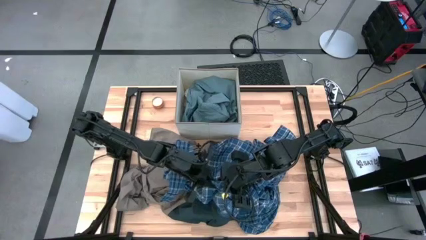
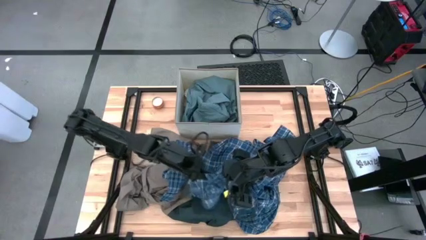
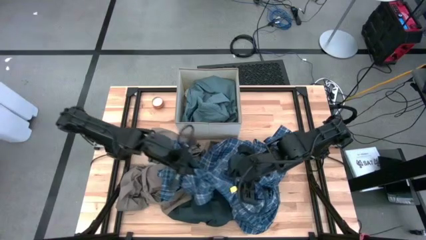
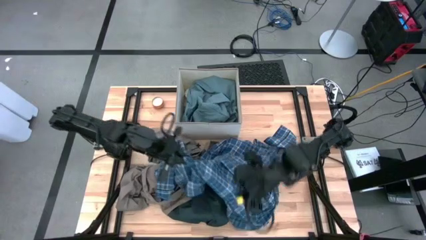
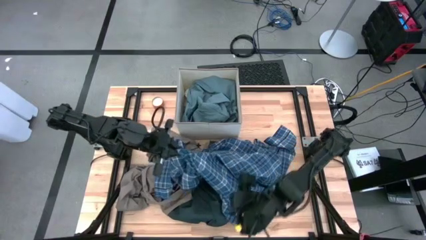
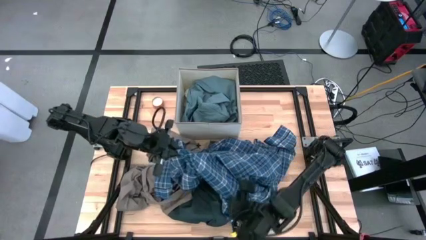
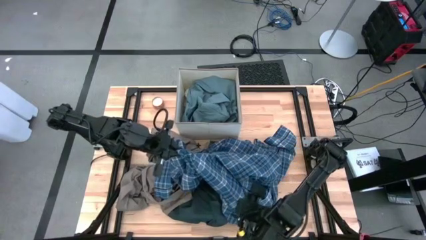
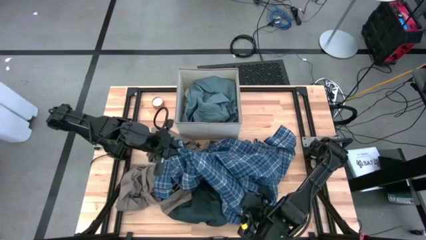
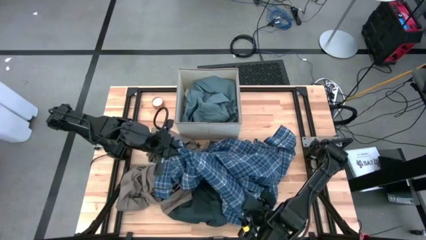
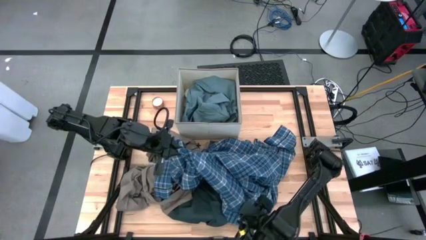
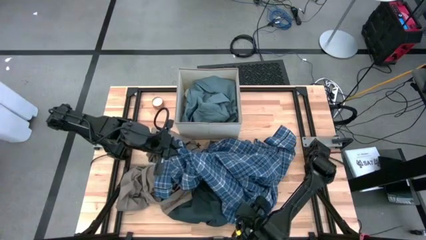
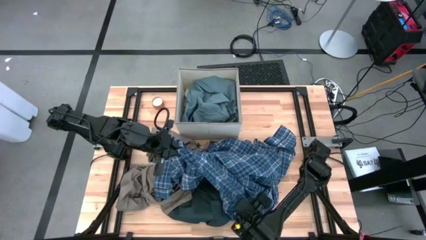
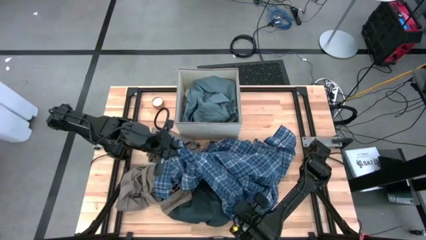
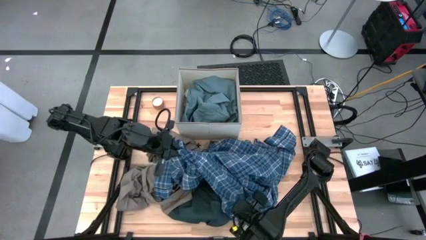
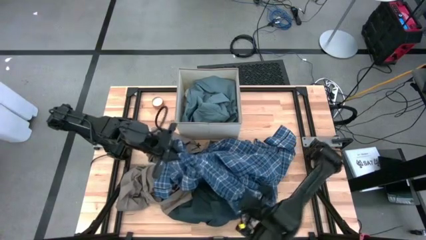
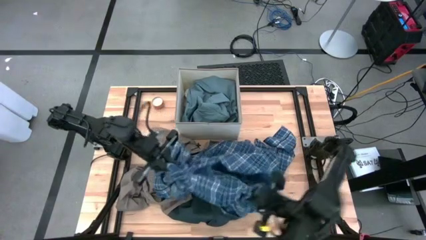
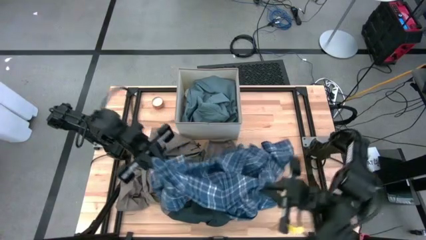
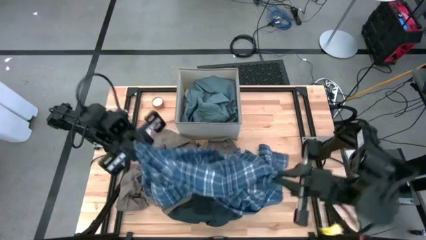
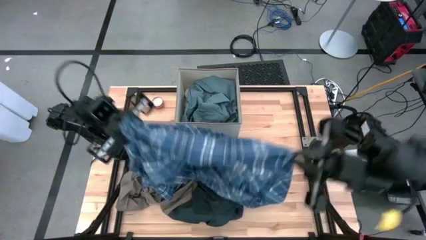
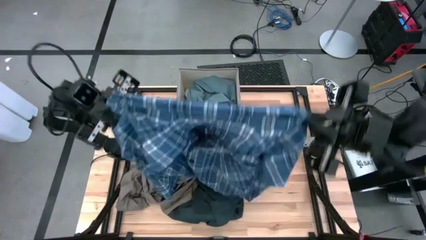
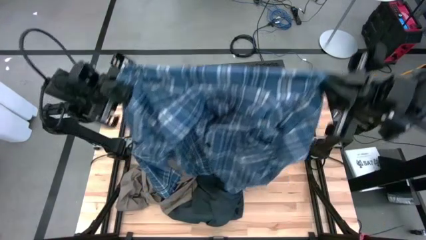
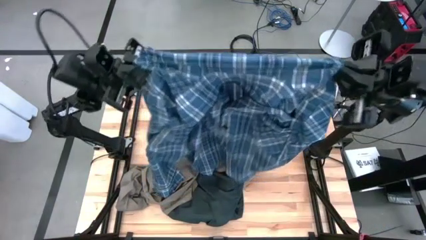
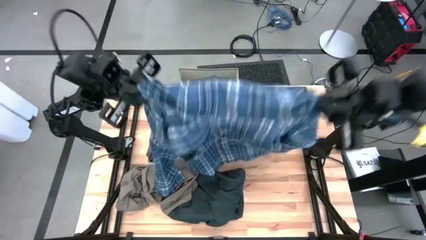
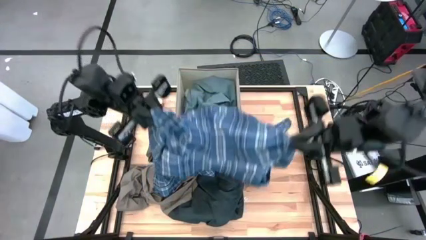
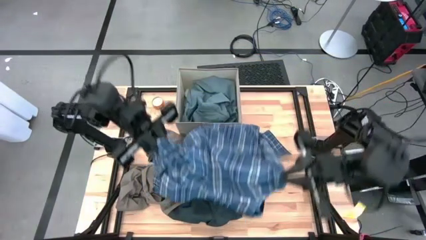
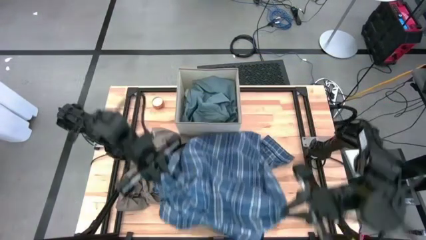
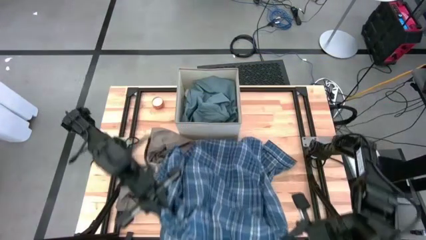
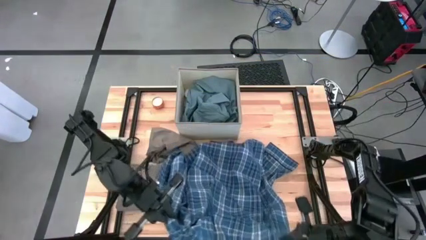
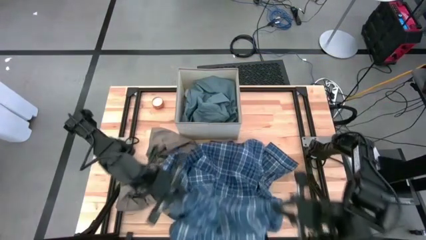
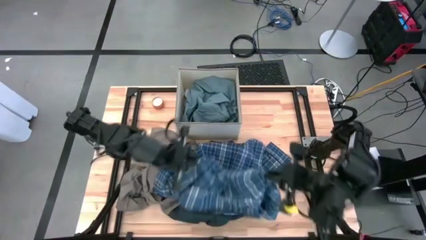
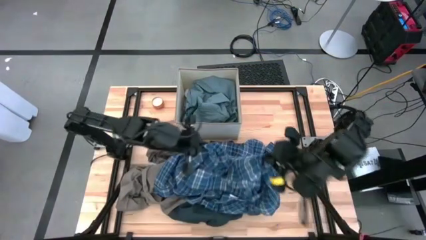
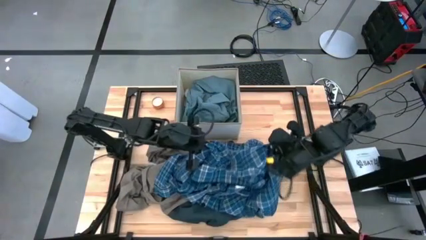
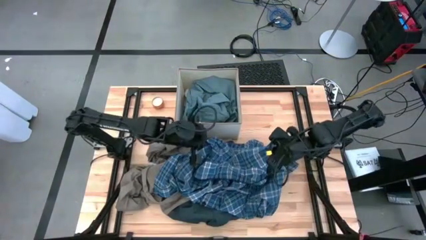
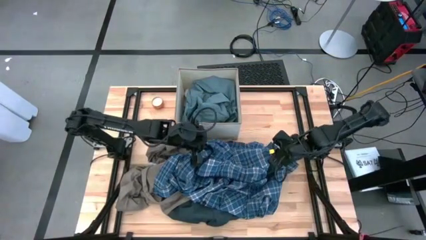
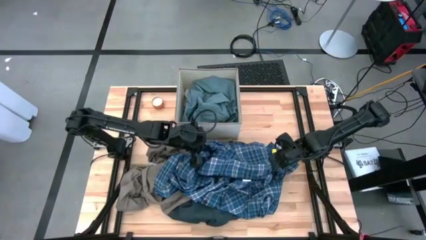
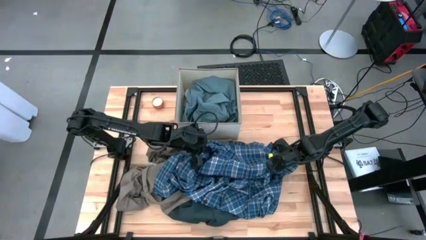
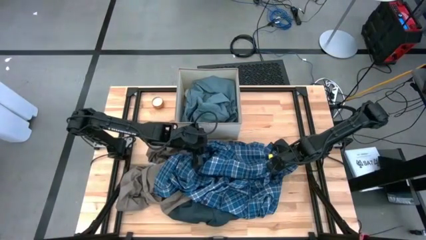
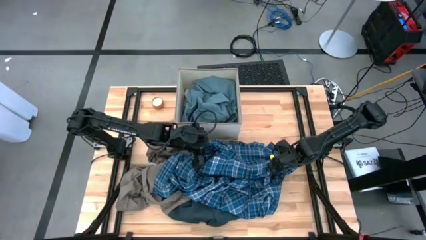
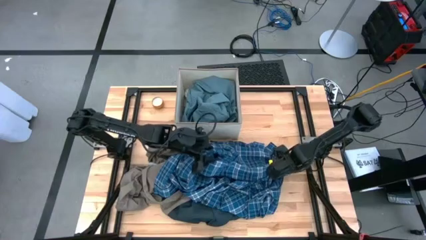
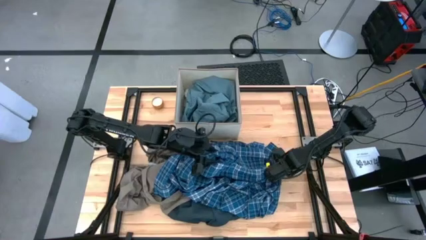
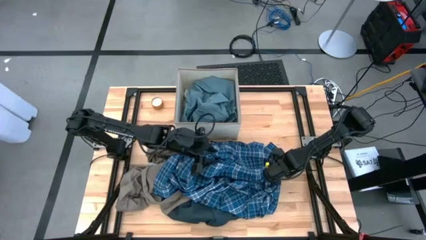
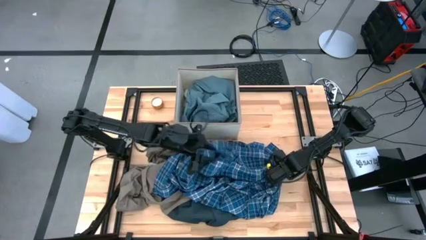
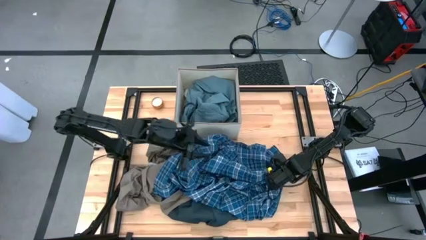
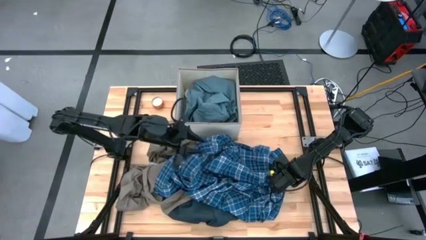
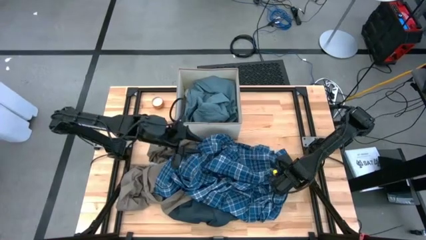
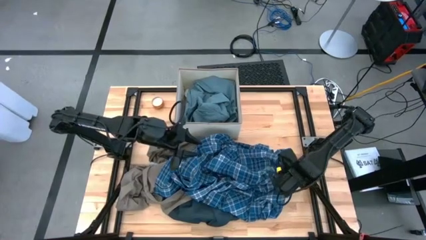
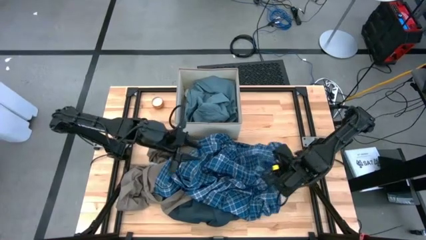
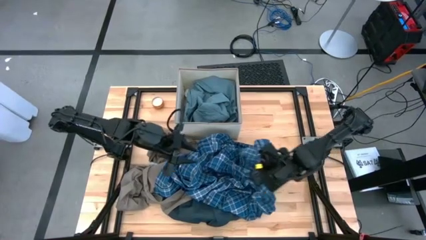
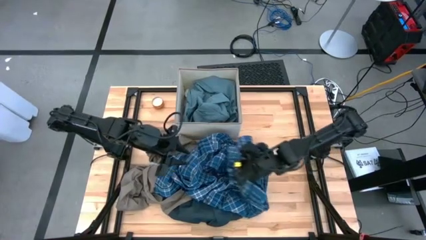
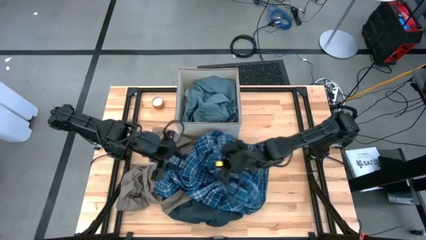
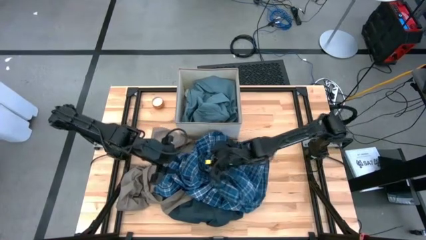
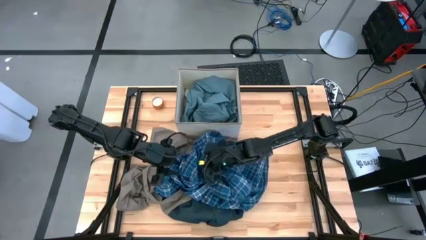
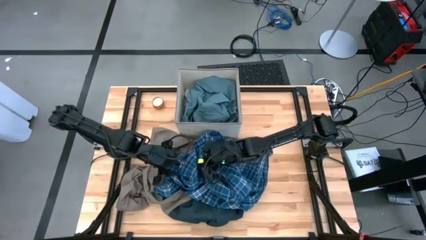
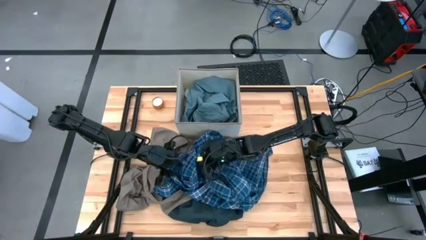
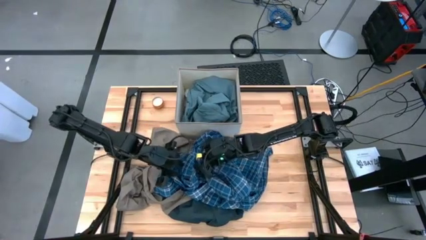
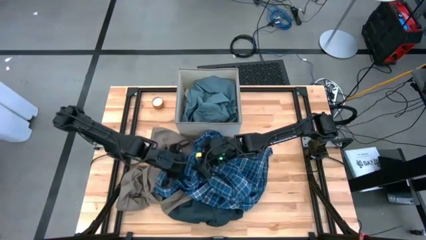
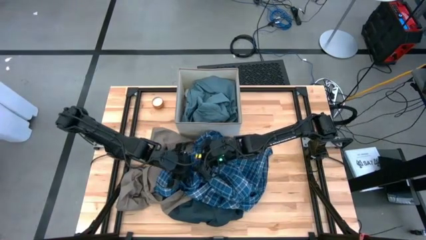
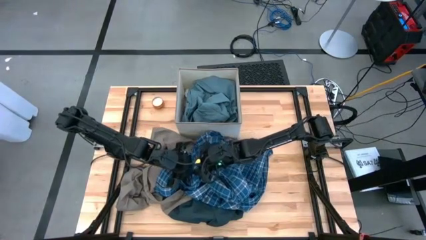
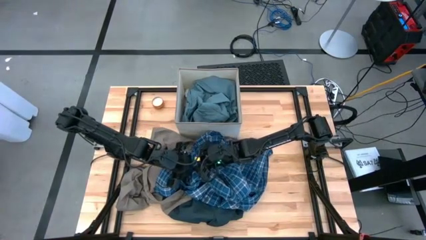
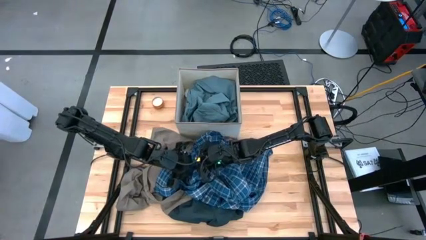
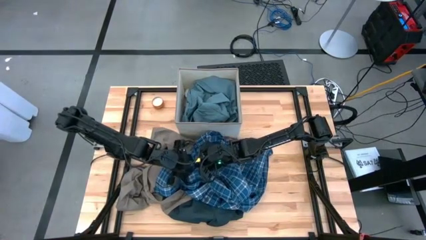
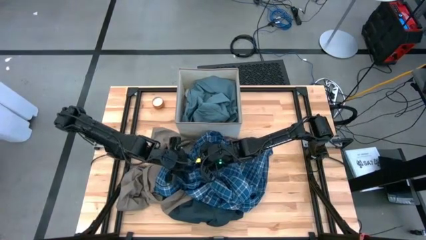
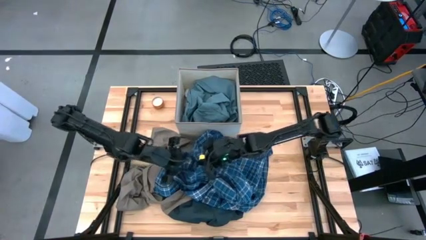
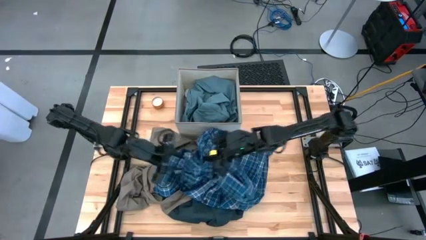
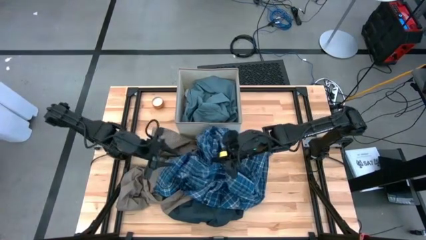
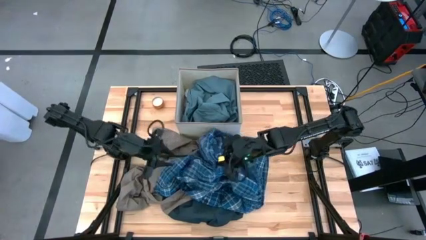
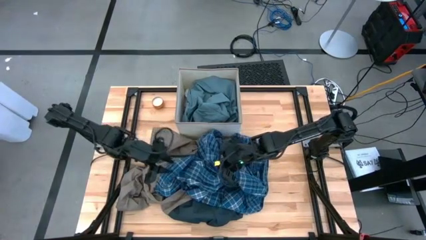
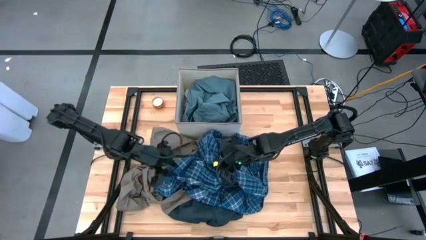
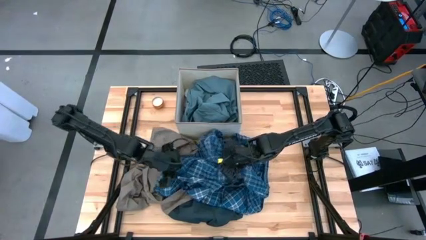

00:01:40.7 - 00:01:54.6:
Task: Sort clothes
Put the blue plaid shirt into the laundry bin
